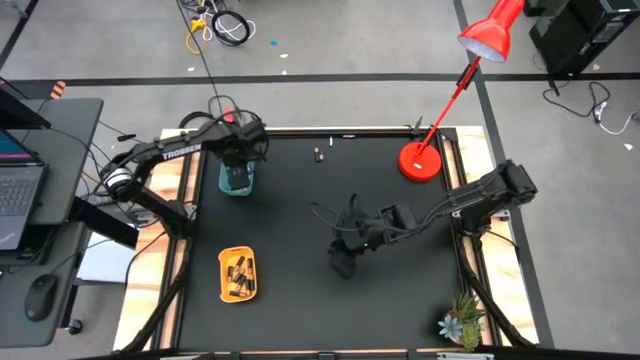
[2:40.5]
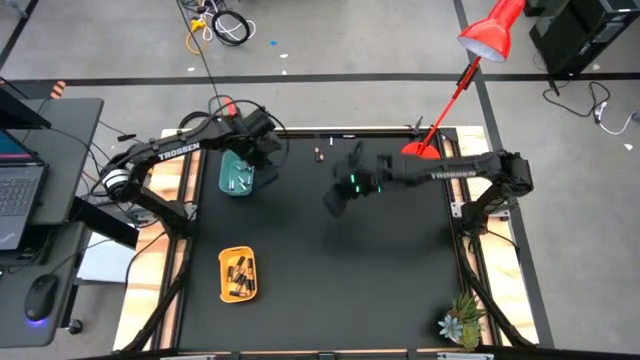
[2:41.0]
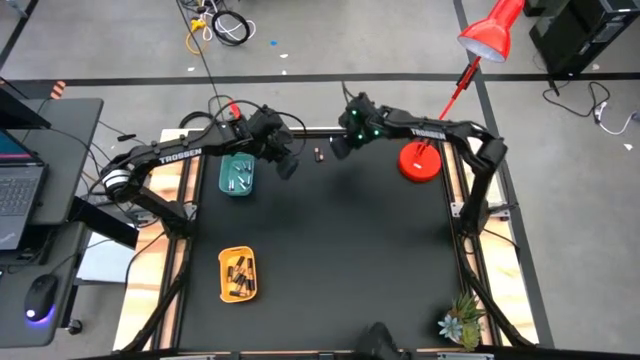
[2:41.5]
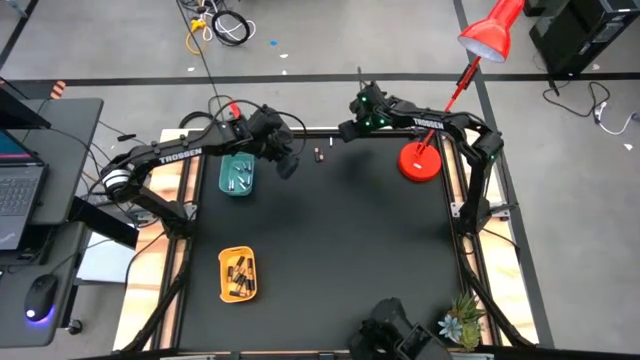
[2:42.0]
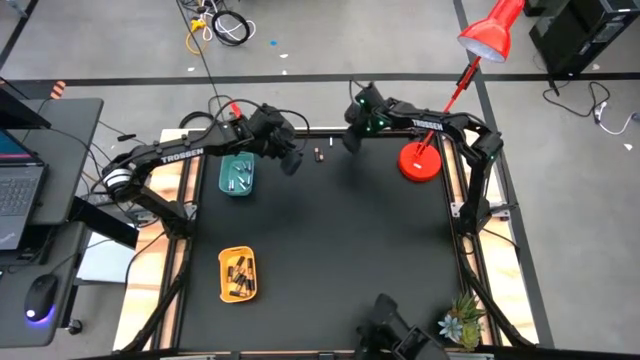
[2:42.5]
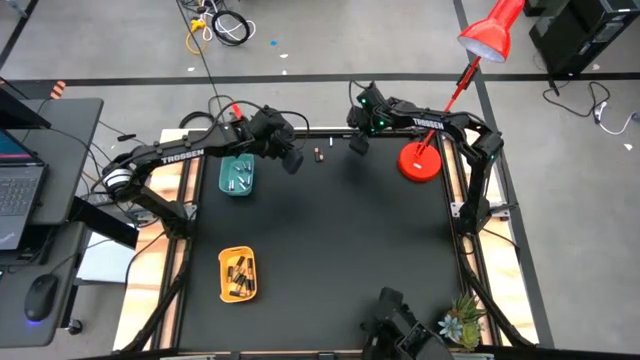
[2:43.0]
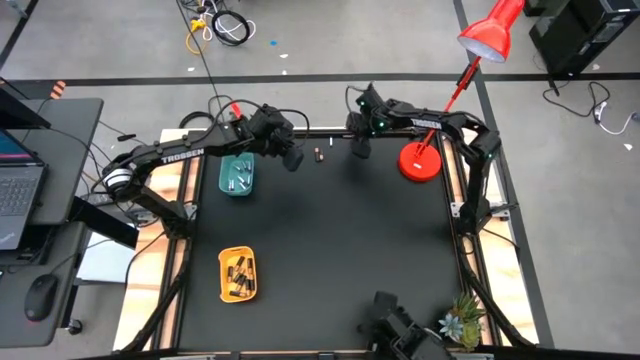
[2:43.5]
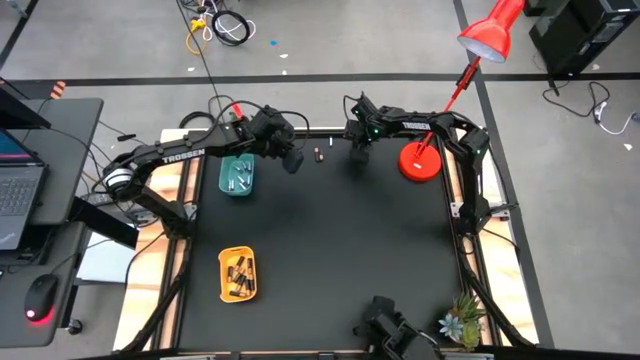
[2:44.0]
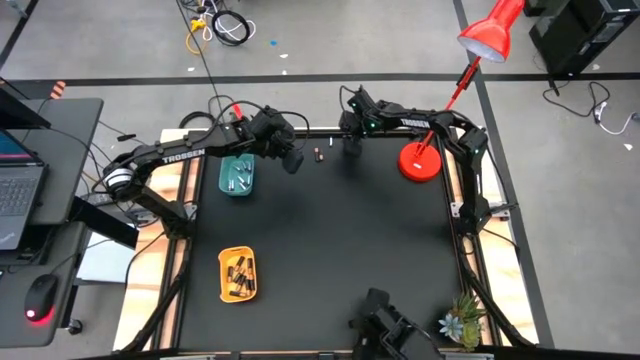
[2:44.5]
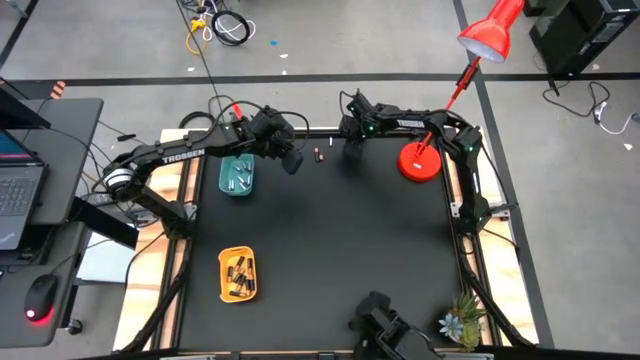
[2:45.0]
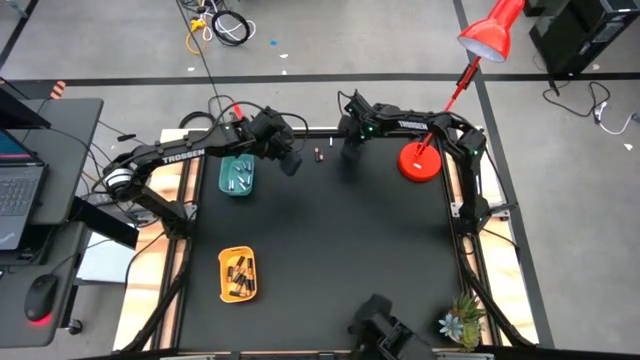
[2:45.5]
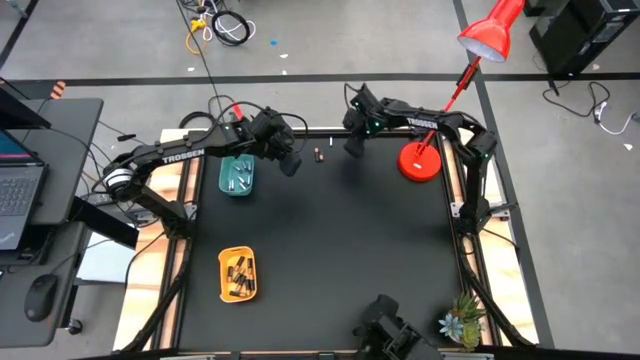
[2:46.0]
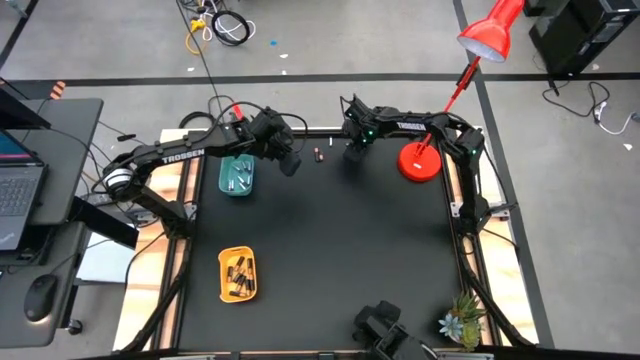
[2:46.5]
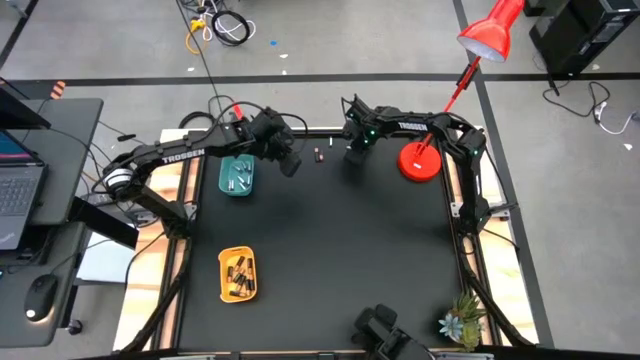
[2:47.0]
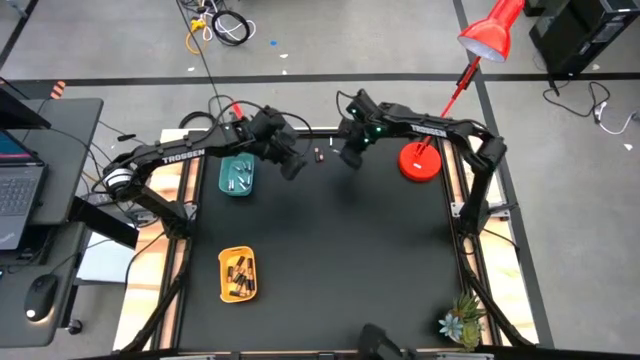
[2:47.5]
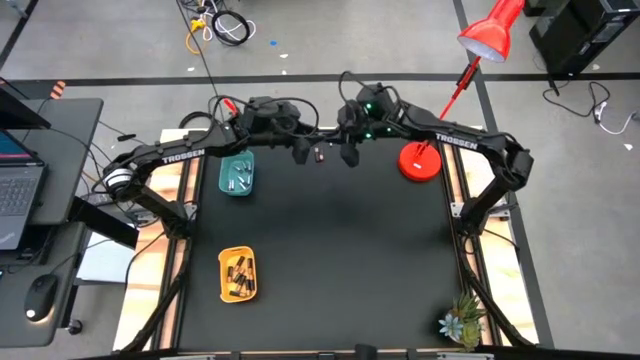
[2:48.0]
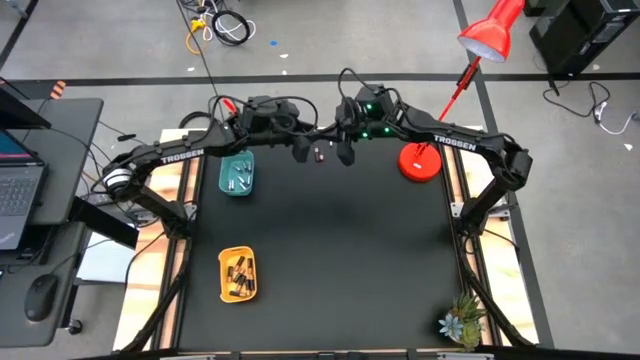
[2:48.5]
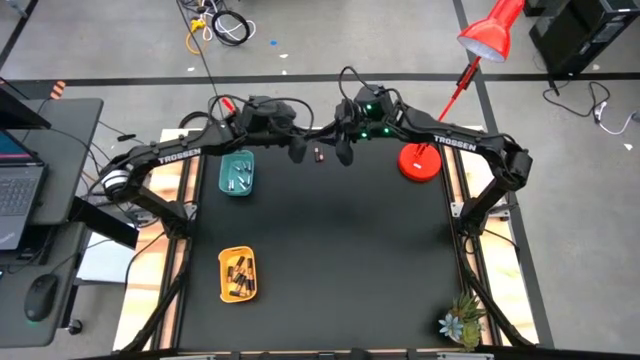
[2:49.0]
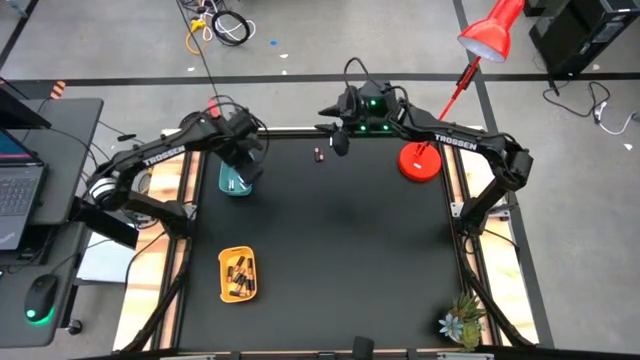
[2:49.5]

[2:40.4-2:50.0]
Task: Sort batteries
Put the white battery into the blue bin

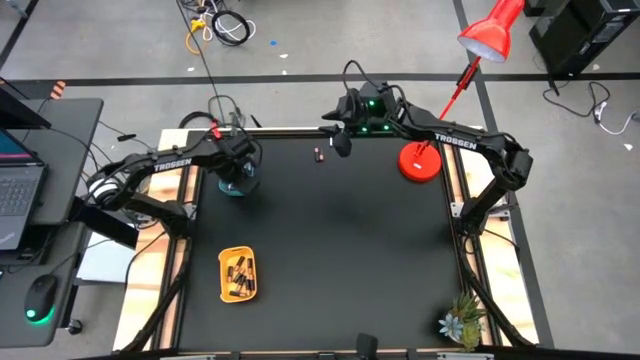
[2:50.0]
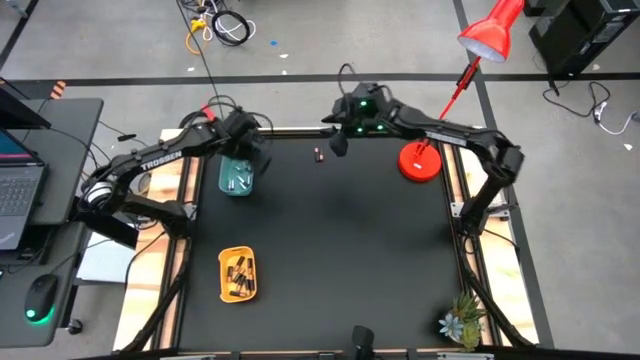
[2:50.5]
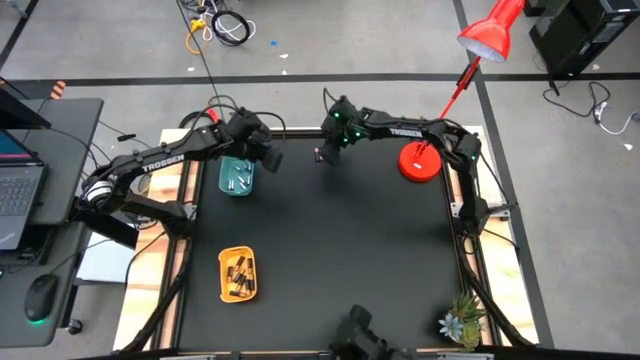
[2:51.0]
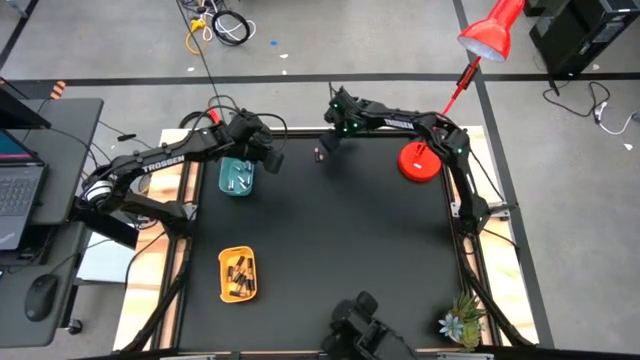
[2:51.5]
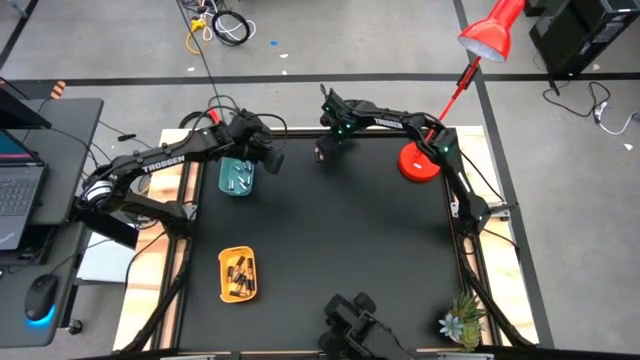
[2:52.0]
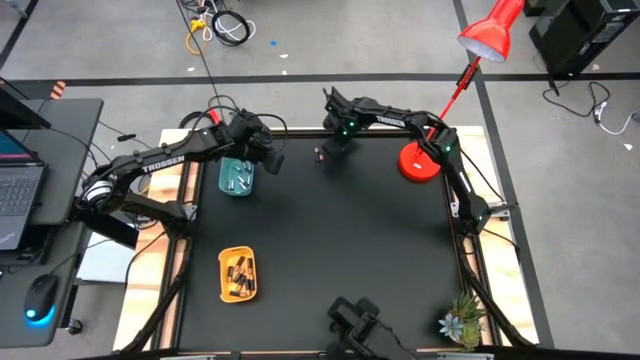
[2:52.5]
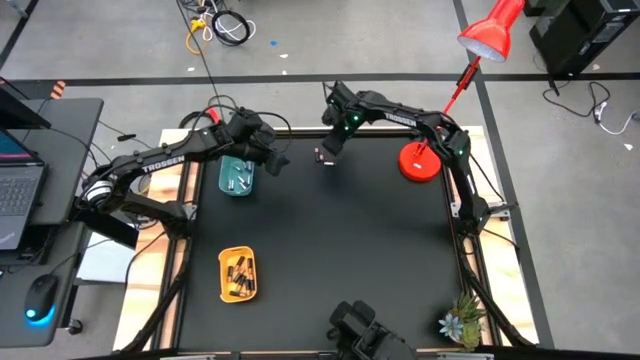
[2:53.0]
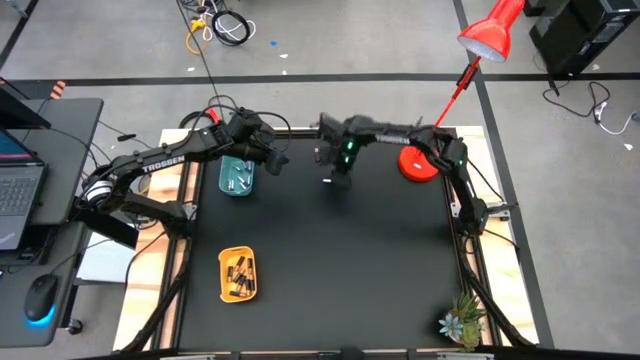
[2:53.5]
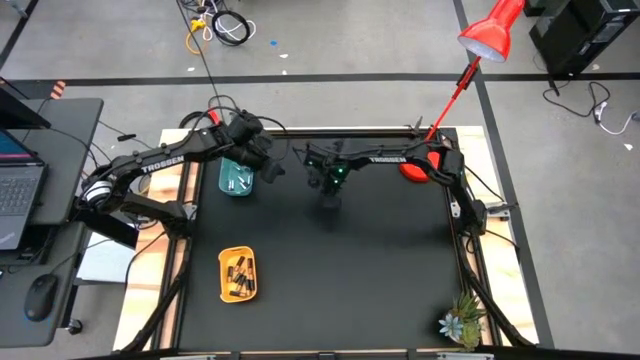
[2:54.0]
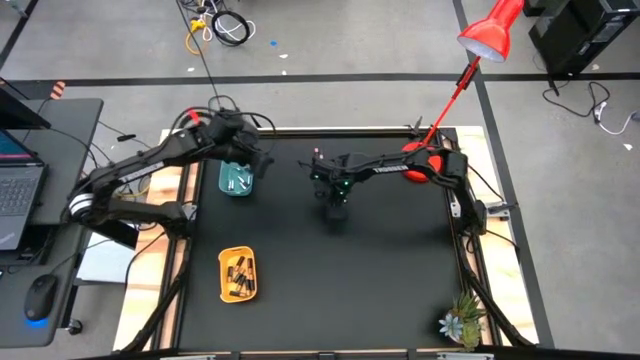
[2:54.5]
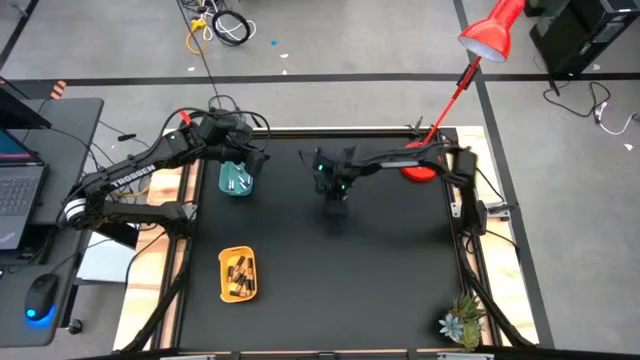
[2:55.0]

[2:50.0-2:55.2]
Put the white battery into the blue bin

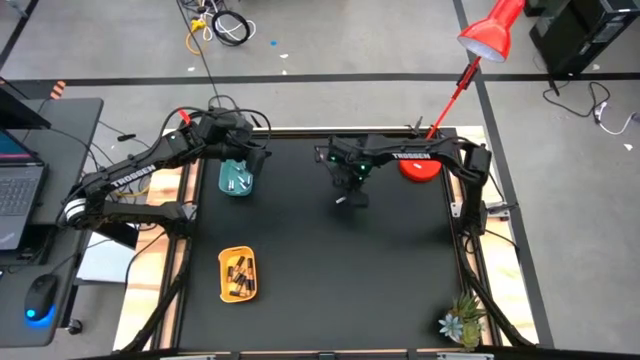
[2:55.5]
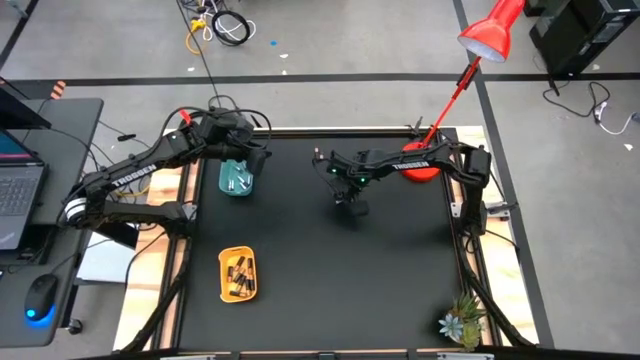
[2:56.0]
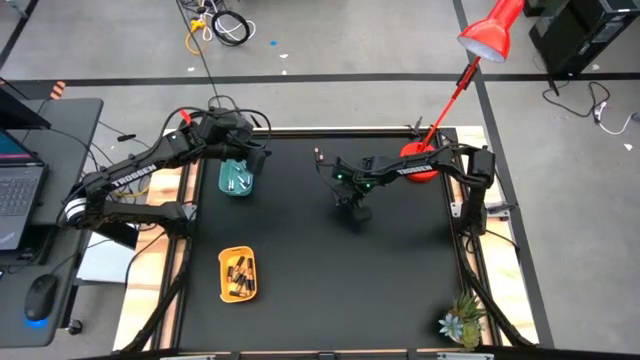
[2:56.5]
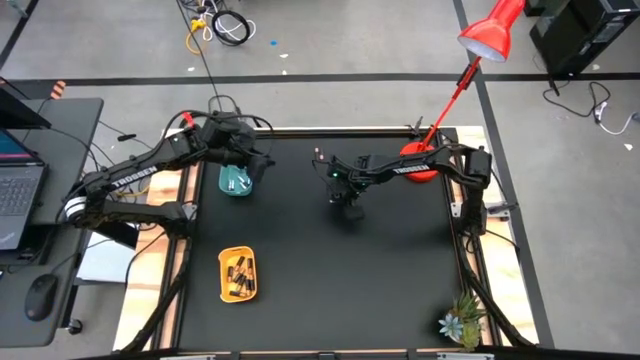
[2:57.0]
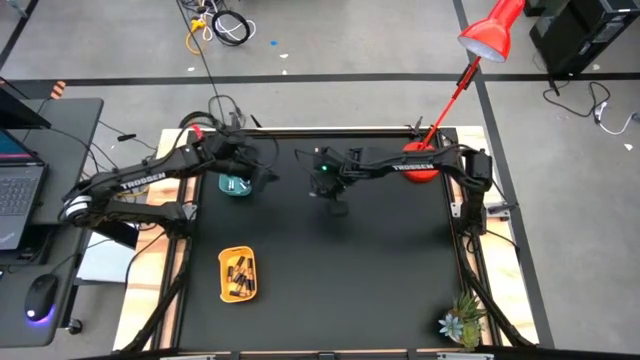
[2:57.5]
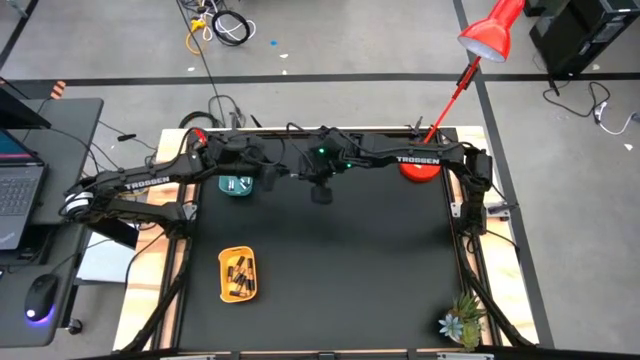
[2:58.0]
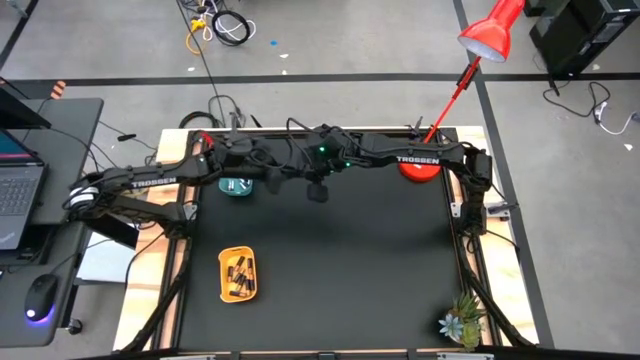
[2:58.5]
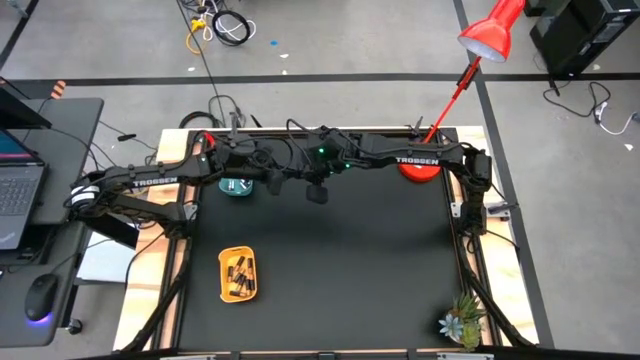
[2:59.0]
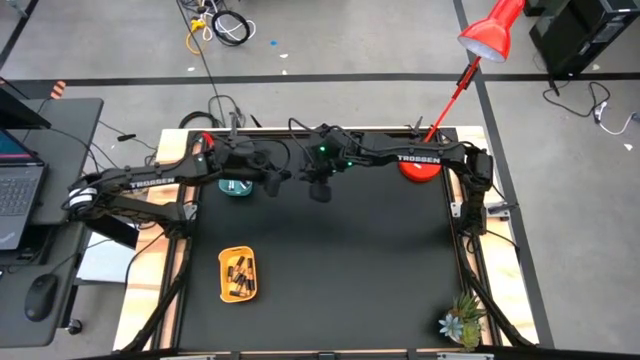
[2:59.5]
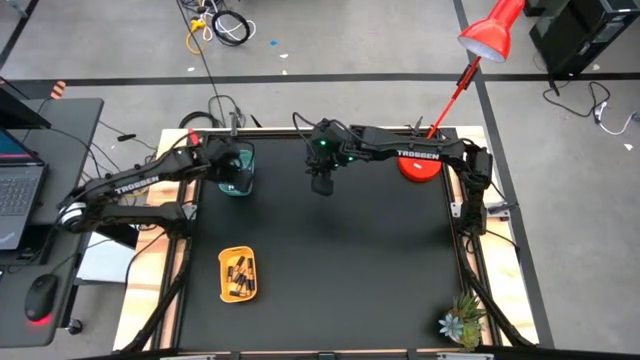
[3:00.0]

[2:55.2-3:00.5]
Put the white battery into the blue bin
